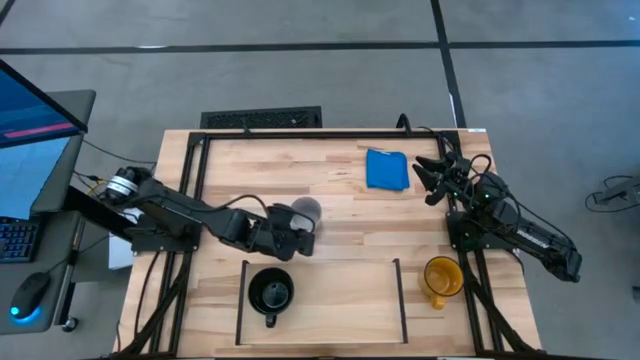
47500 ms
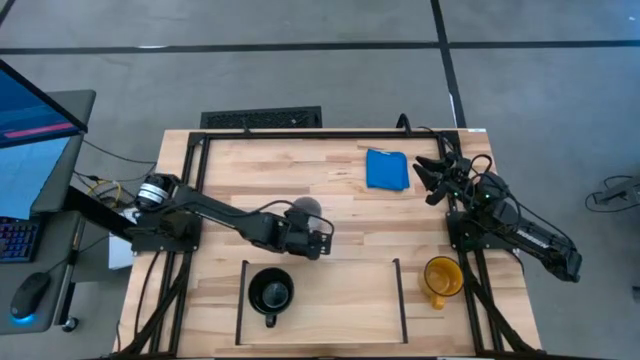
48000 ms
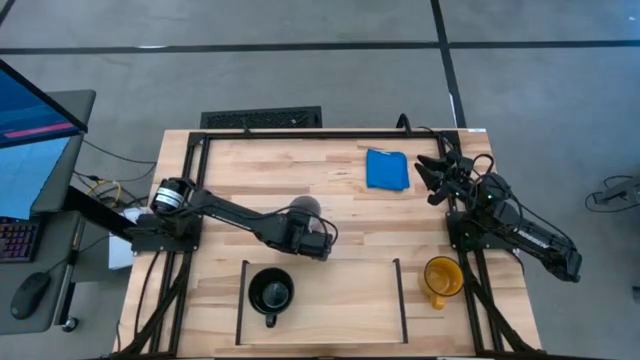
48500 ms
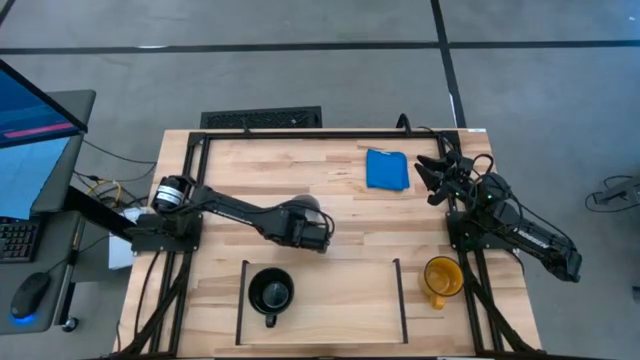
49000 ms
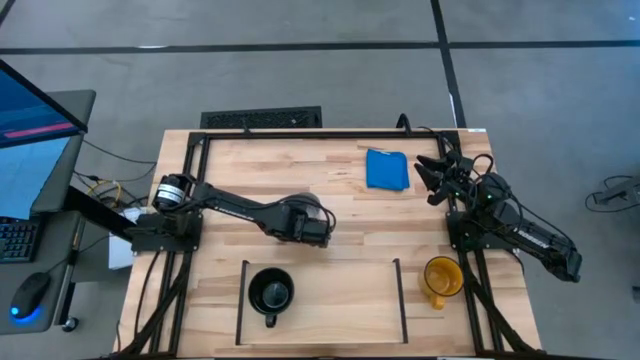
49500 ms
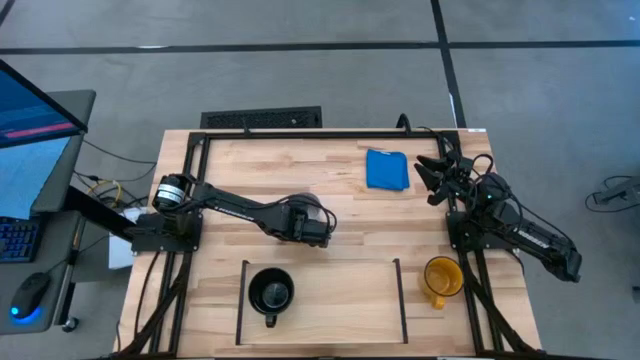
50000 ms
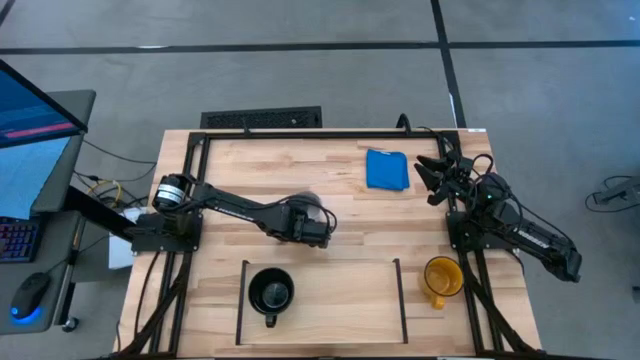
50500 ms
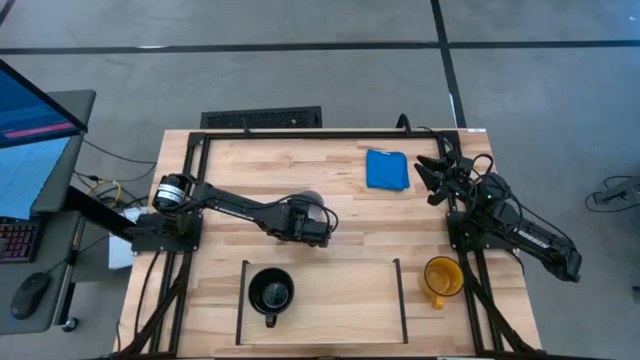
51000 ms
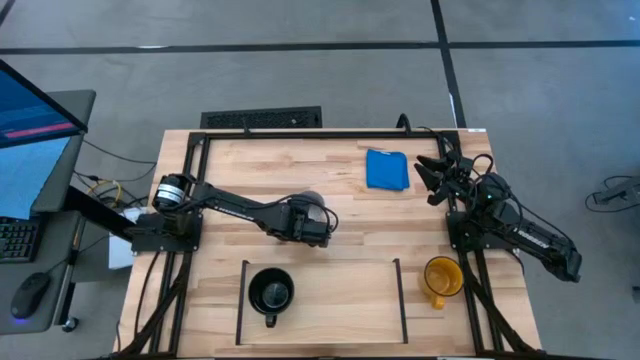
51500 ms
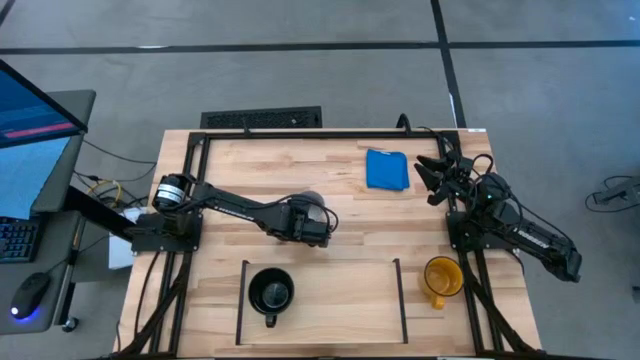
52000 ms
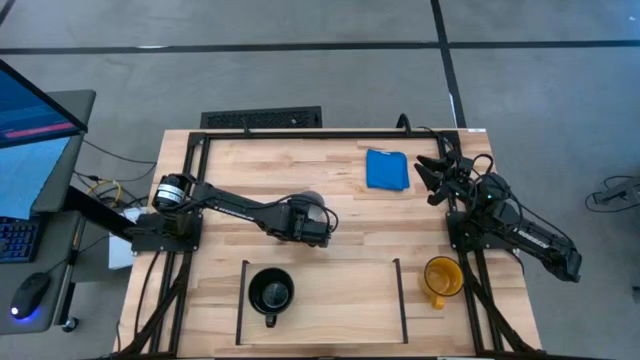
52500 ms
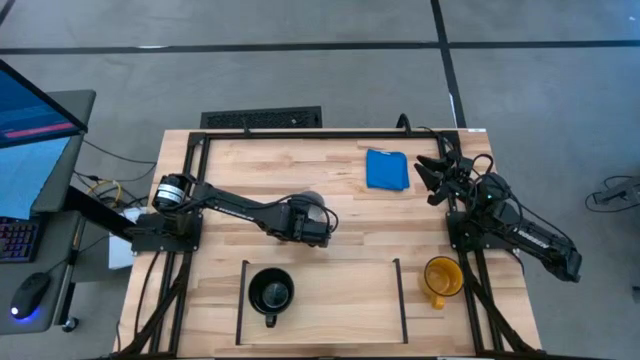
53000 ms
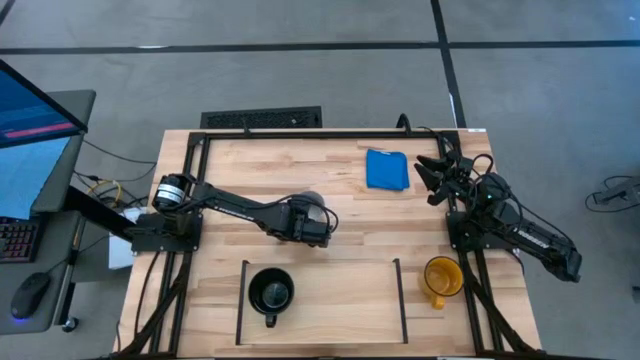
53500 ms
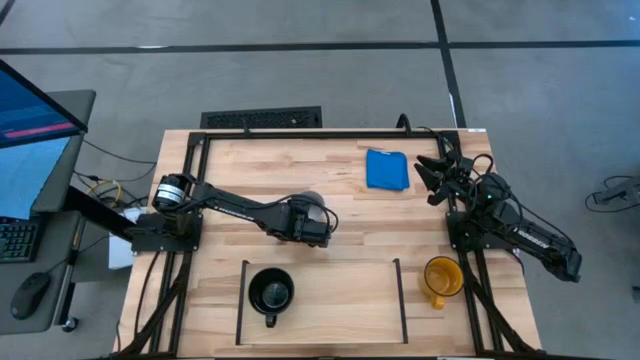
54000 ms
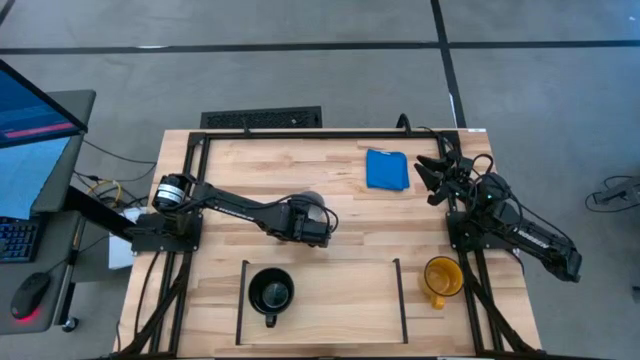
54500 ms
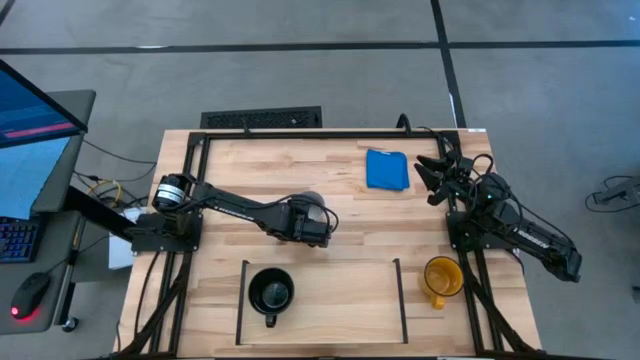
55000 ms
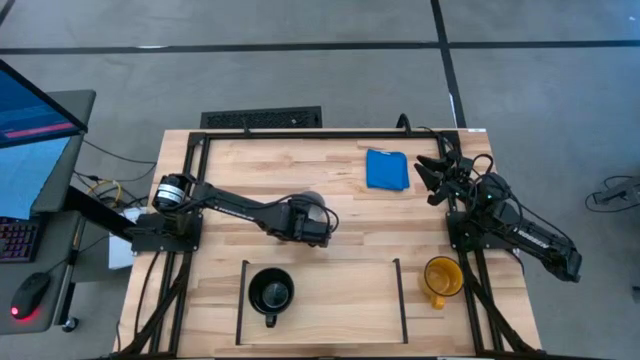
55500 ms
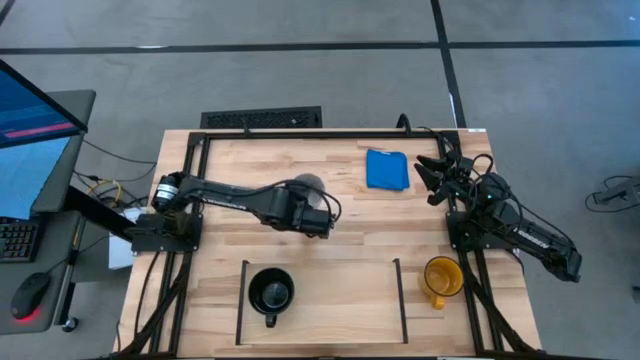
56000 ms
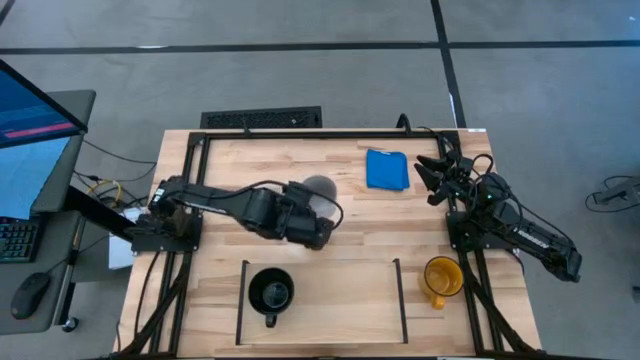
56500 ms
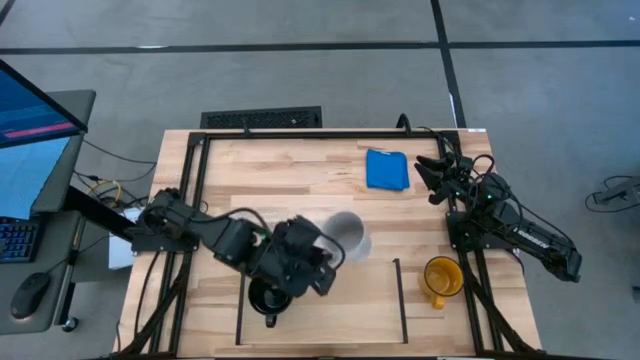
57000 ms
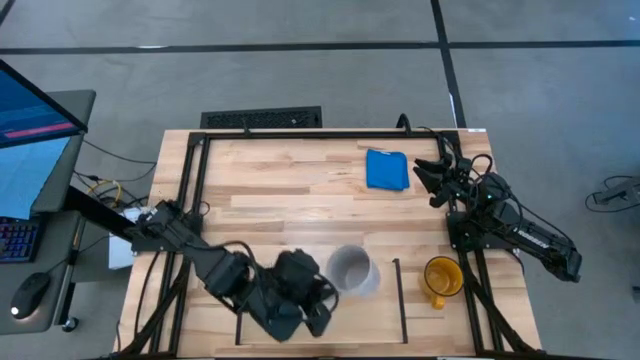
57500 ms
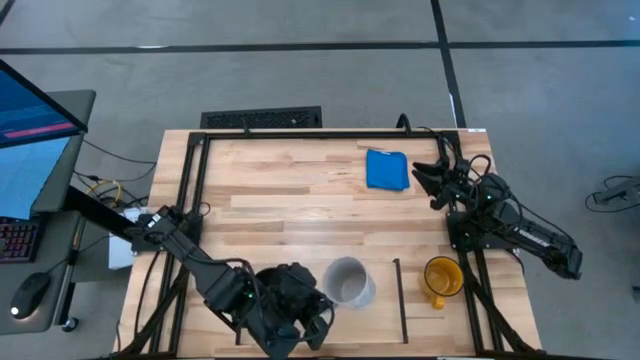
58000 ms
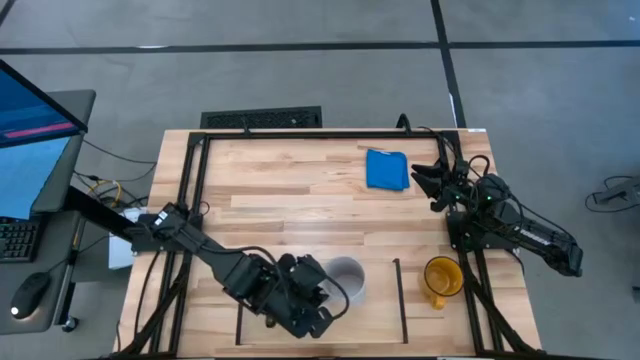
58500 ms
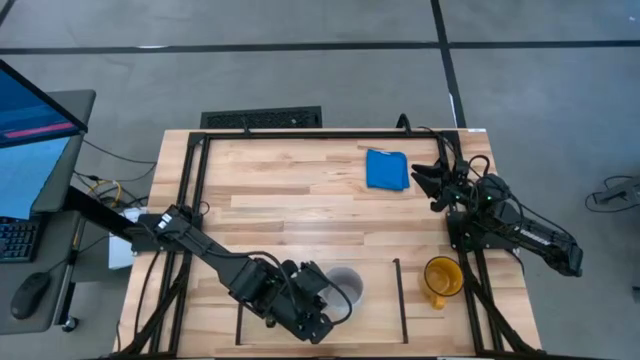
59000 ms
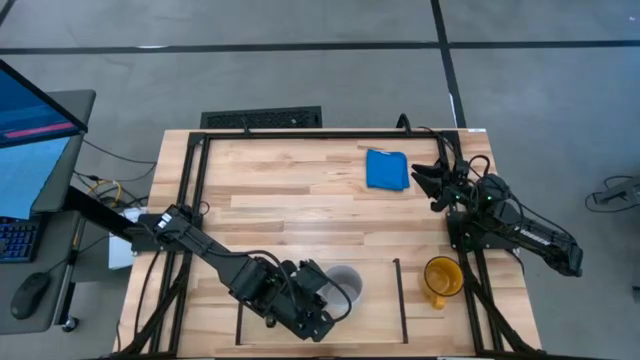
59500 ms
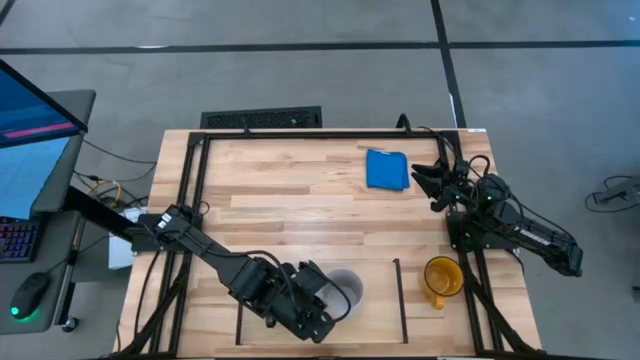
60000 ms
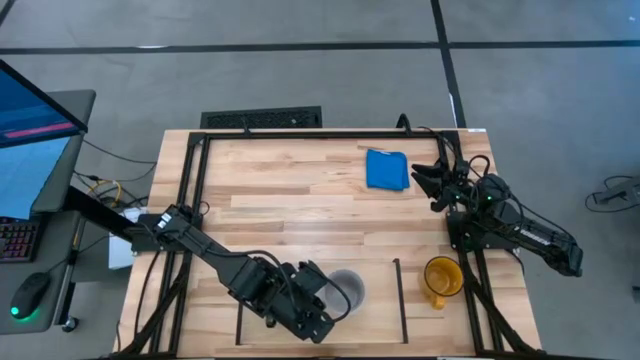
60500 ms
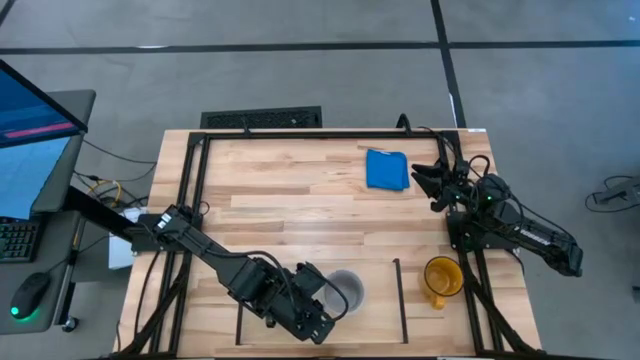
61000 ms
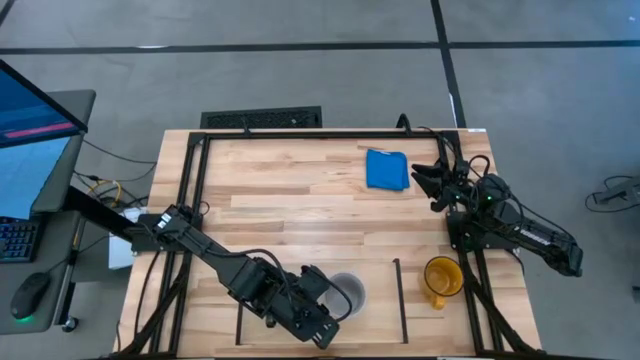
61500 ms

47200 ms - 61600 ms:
Task: Stack small to large cups/mugs on shelf
Put the white mug on the shelf

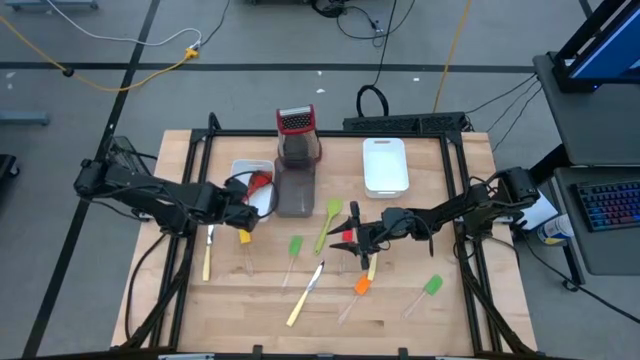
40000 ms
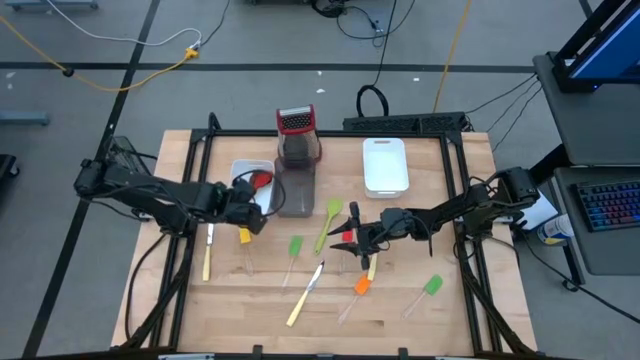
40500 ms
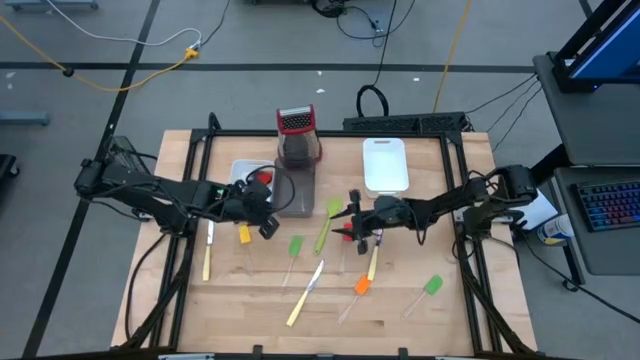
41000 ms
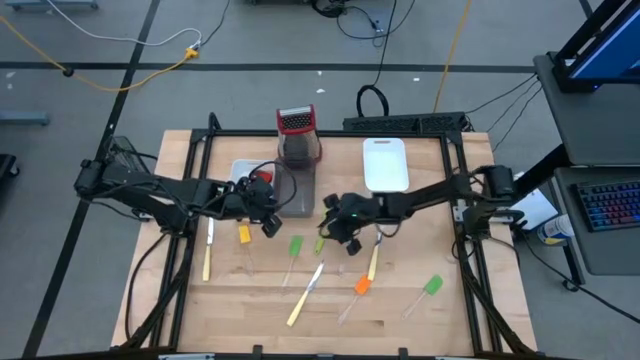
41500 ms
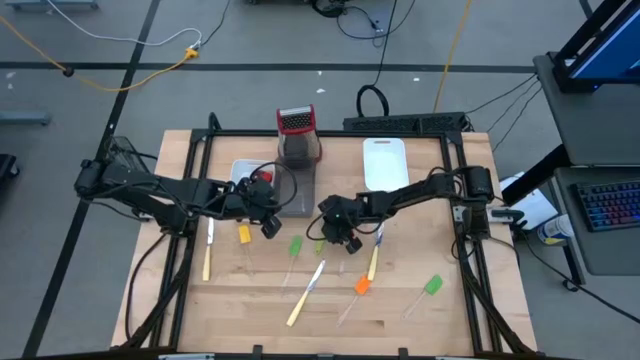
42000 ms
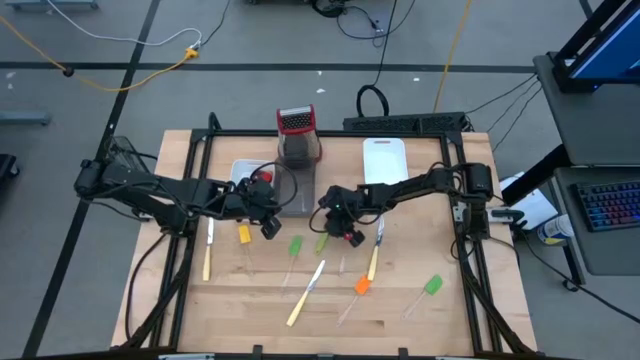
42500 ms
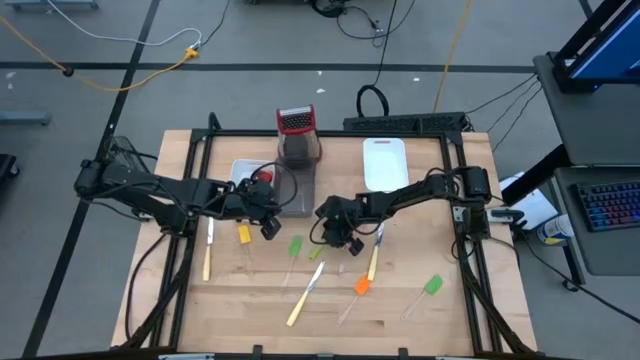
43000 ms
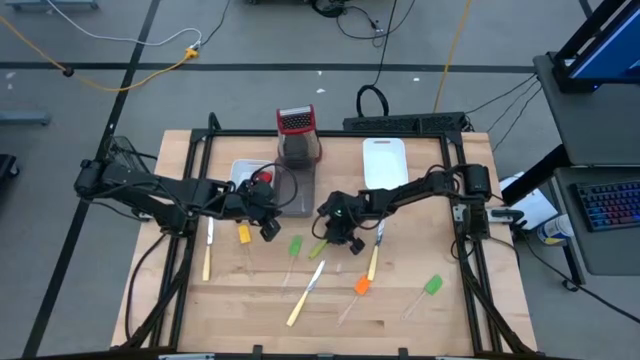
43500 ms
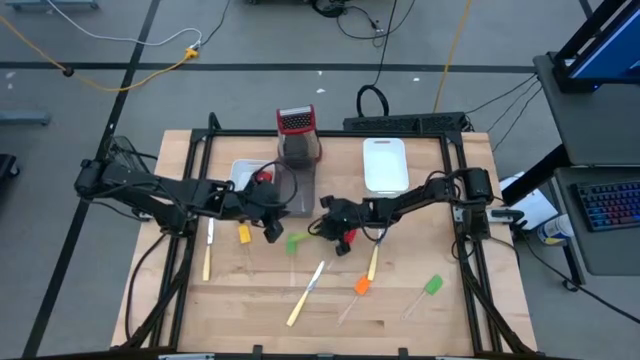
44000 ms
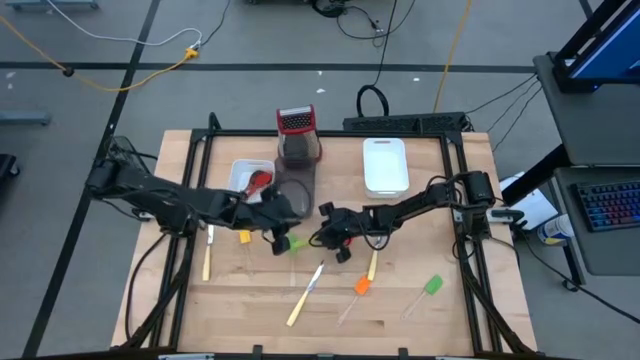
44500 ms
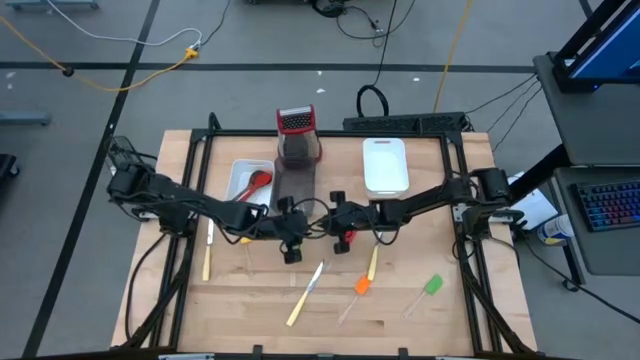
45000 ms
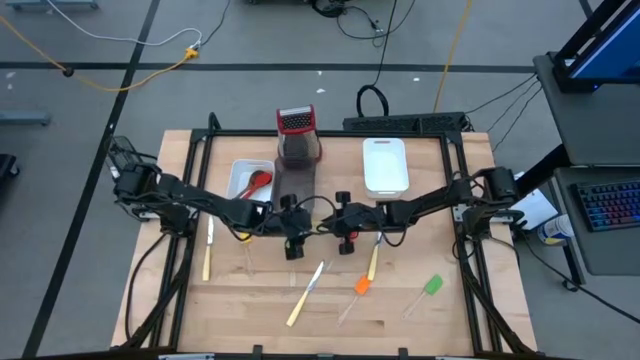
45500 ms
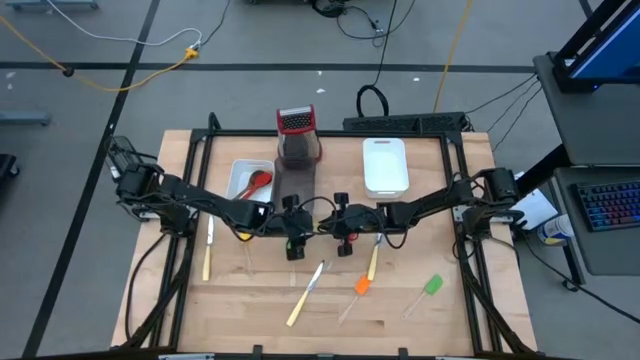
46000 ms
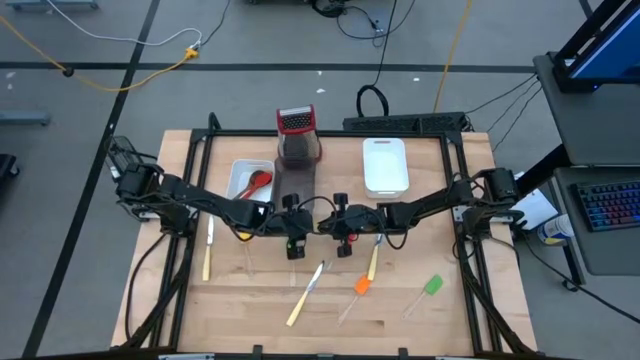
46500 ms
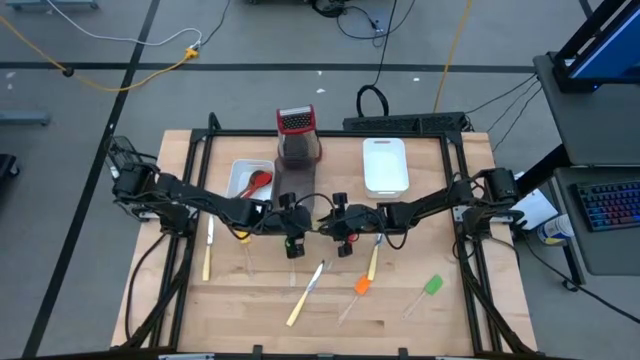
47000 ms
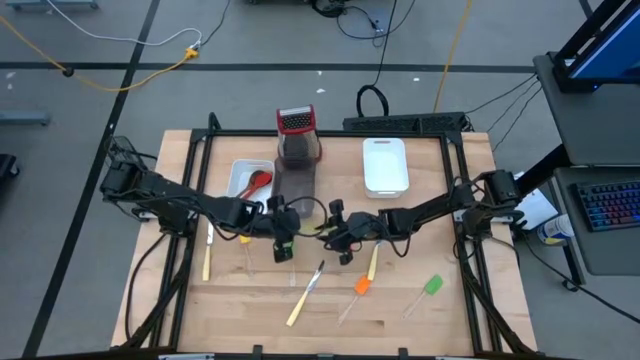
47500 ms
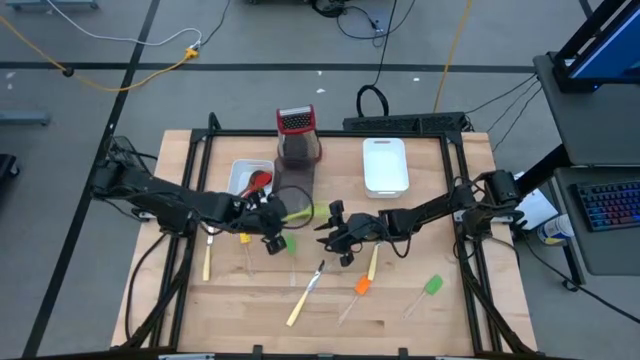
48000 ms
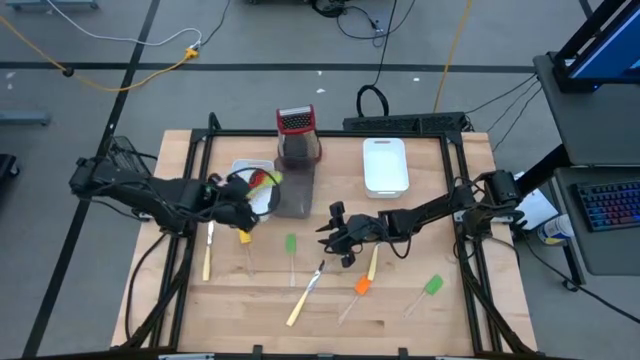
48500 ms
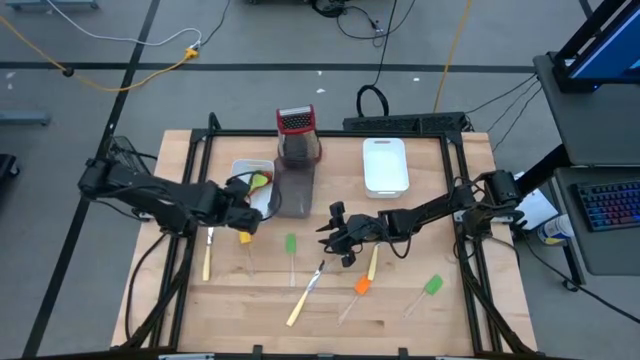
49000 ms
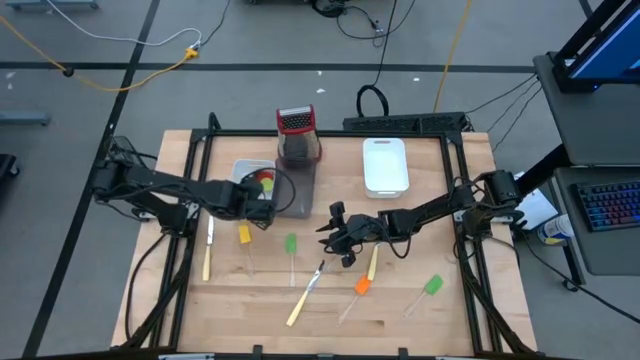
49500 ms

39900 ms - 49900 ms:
Task: Pick & Place Kitchen Items
Put the green serving spoon into the left white bin
